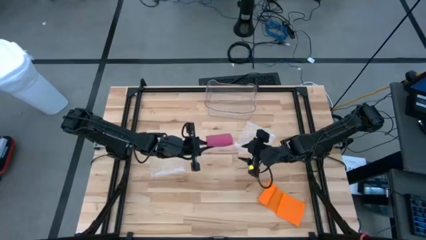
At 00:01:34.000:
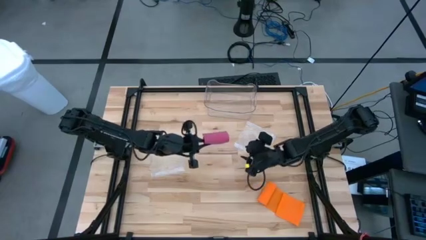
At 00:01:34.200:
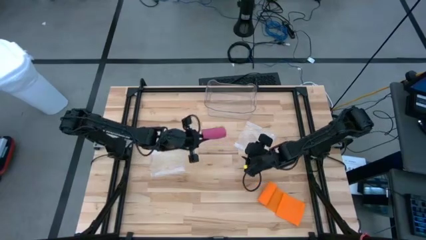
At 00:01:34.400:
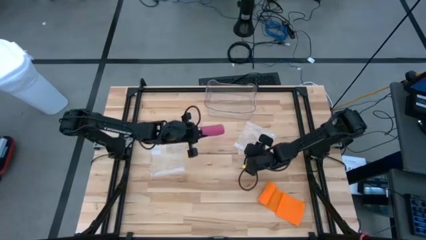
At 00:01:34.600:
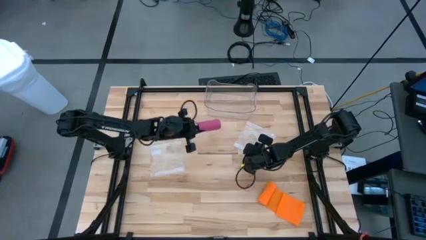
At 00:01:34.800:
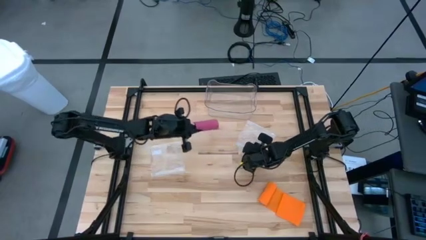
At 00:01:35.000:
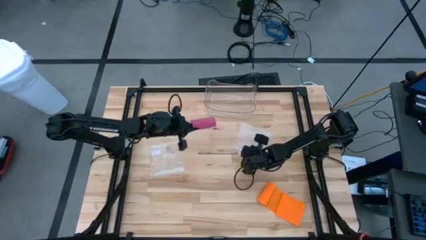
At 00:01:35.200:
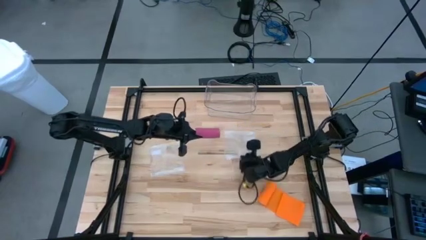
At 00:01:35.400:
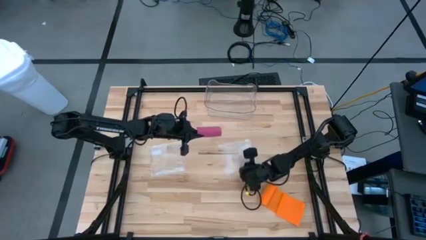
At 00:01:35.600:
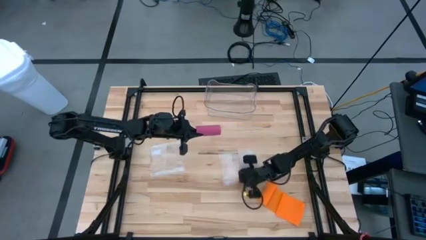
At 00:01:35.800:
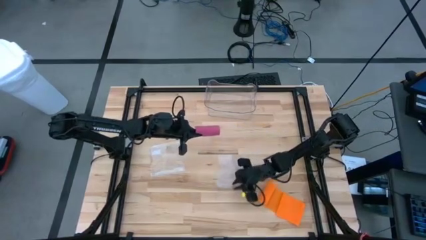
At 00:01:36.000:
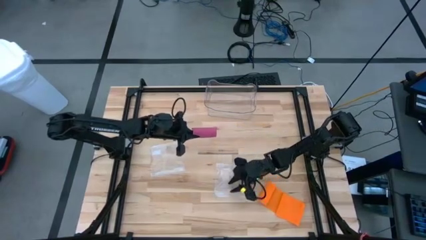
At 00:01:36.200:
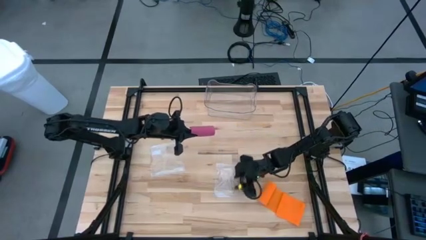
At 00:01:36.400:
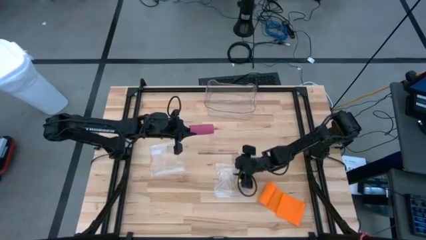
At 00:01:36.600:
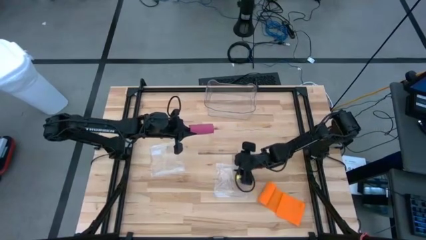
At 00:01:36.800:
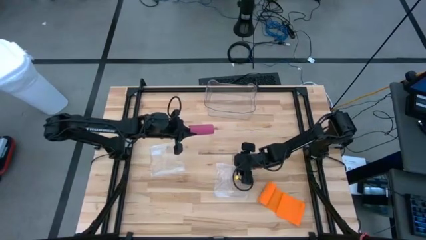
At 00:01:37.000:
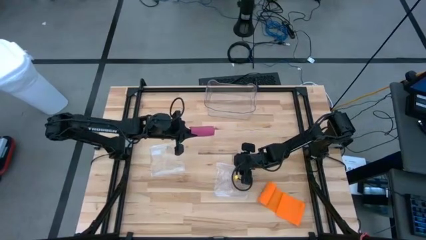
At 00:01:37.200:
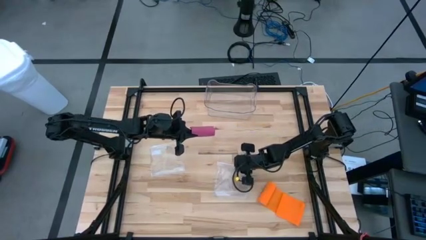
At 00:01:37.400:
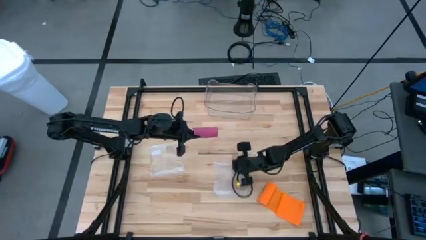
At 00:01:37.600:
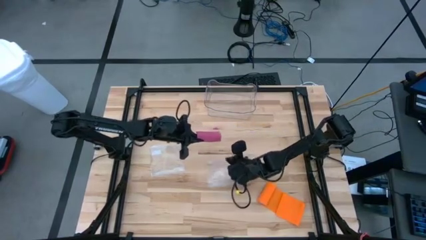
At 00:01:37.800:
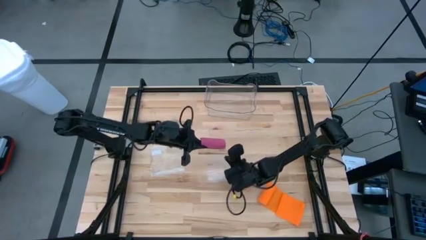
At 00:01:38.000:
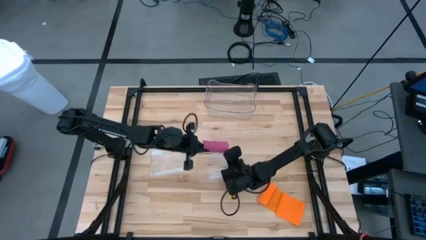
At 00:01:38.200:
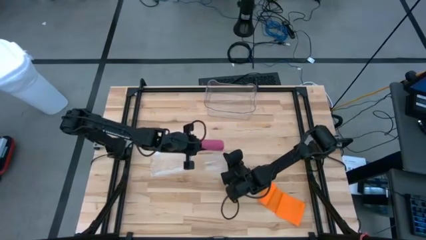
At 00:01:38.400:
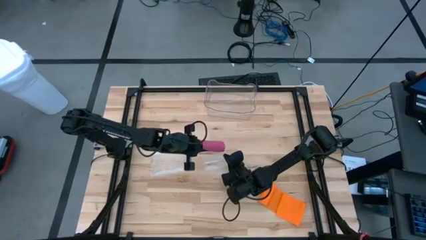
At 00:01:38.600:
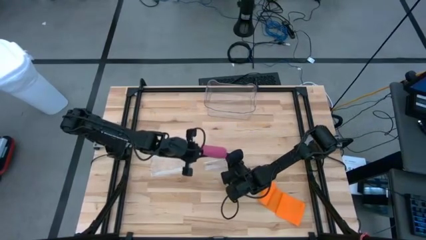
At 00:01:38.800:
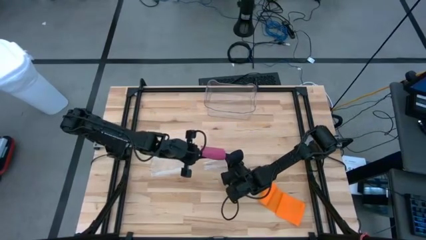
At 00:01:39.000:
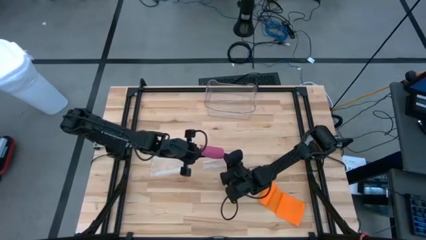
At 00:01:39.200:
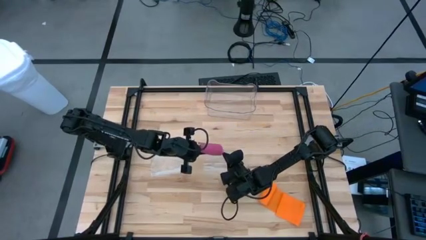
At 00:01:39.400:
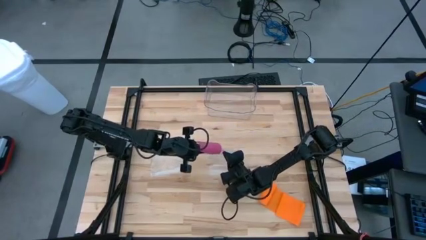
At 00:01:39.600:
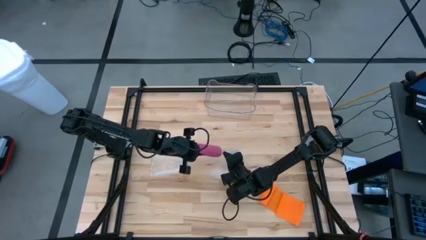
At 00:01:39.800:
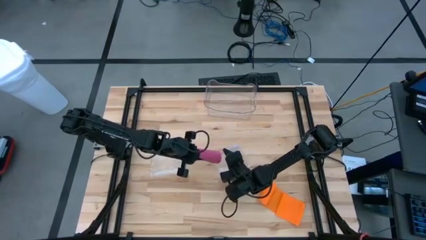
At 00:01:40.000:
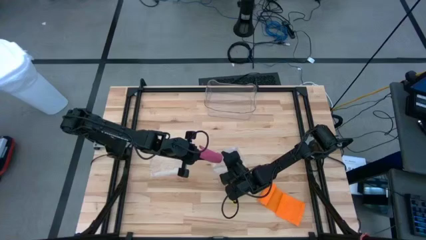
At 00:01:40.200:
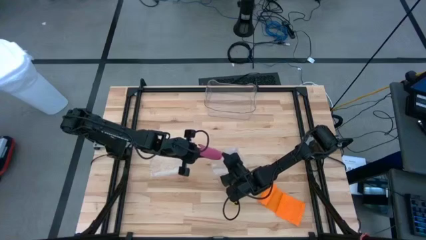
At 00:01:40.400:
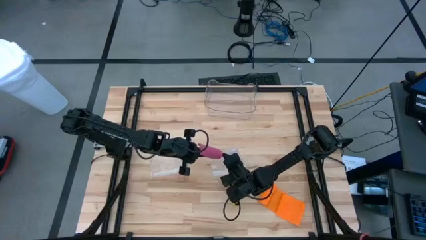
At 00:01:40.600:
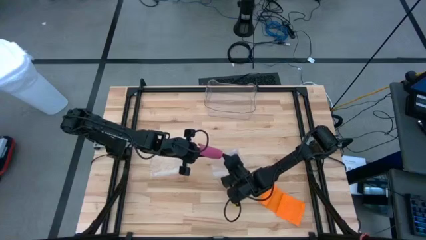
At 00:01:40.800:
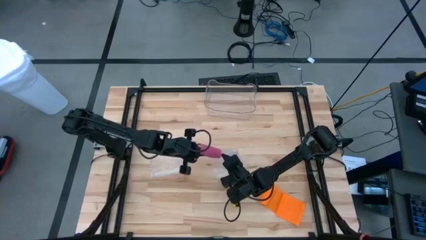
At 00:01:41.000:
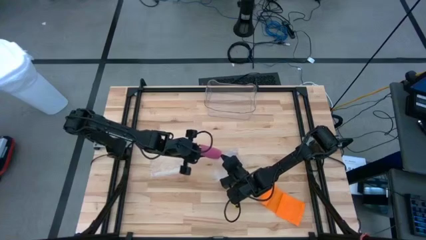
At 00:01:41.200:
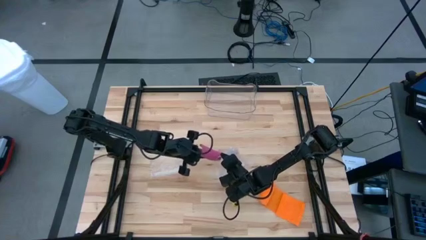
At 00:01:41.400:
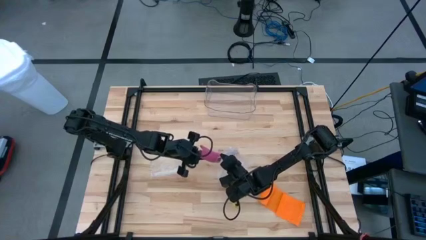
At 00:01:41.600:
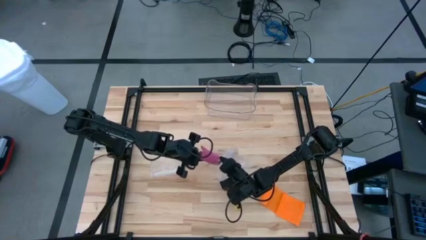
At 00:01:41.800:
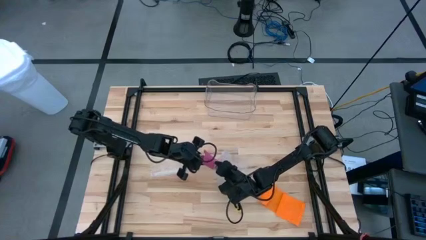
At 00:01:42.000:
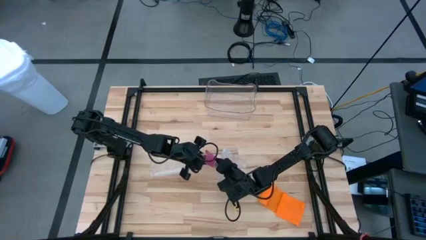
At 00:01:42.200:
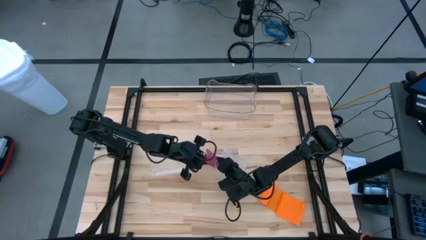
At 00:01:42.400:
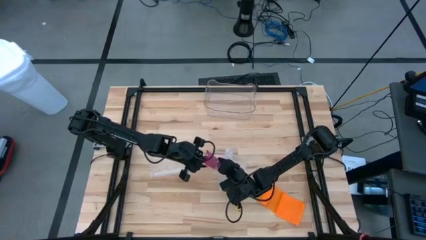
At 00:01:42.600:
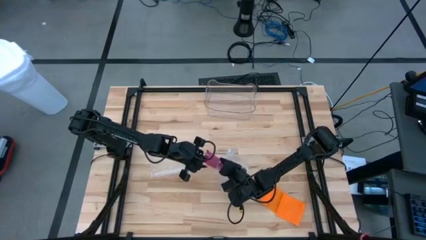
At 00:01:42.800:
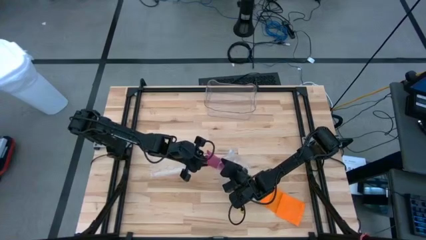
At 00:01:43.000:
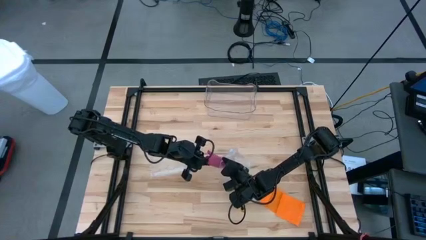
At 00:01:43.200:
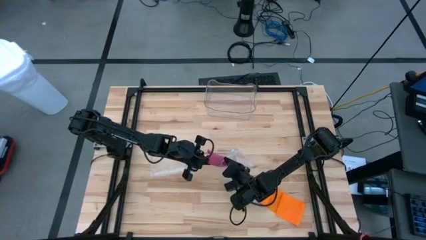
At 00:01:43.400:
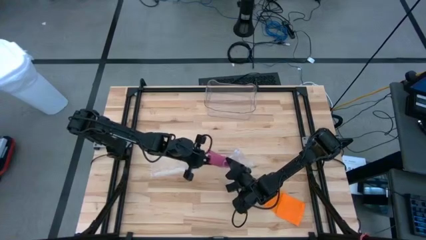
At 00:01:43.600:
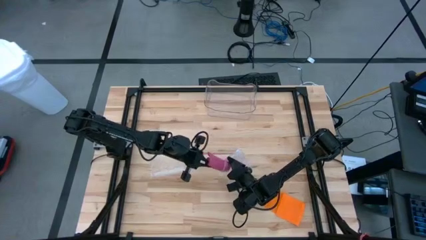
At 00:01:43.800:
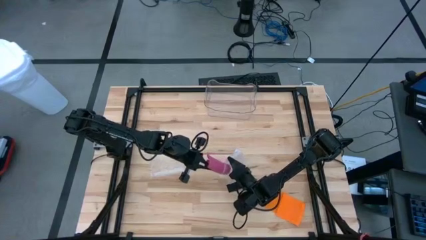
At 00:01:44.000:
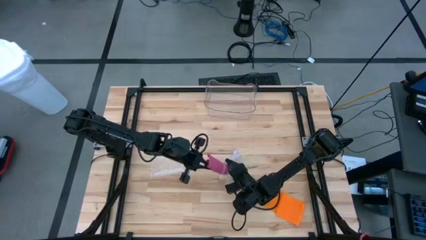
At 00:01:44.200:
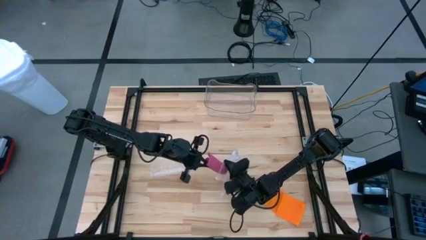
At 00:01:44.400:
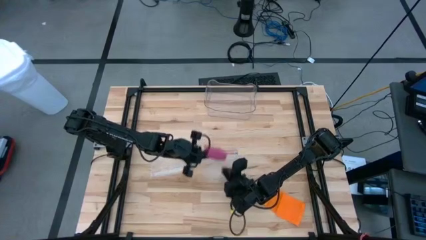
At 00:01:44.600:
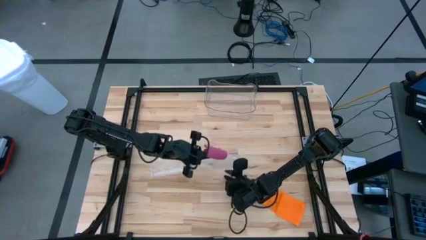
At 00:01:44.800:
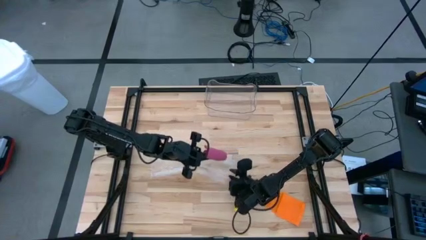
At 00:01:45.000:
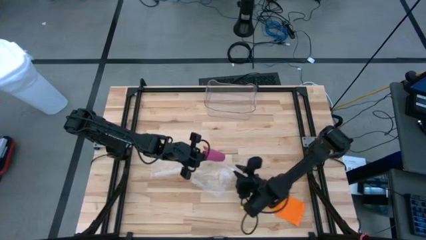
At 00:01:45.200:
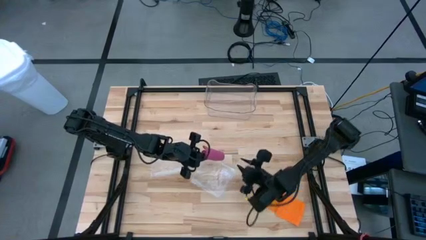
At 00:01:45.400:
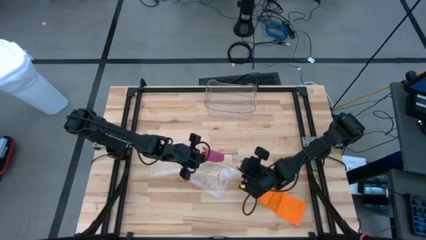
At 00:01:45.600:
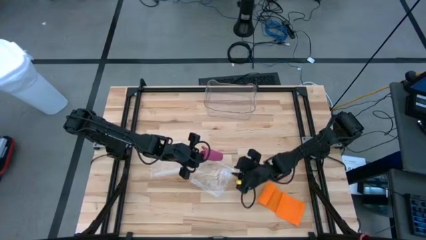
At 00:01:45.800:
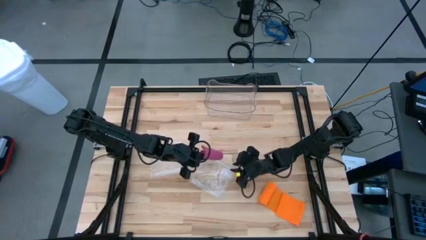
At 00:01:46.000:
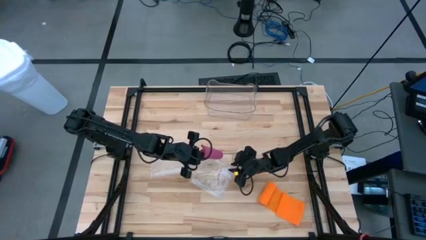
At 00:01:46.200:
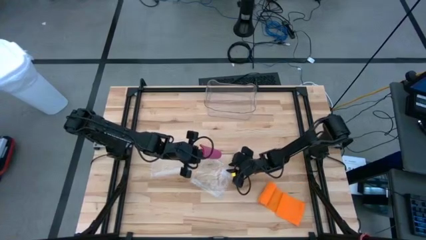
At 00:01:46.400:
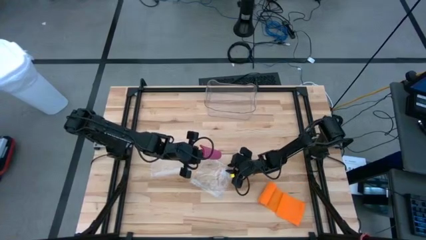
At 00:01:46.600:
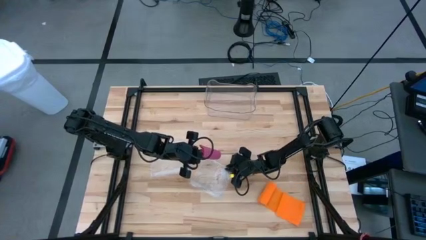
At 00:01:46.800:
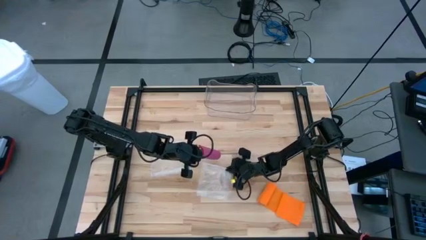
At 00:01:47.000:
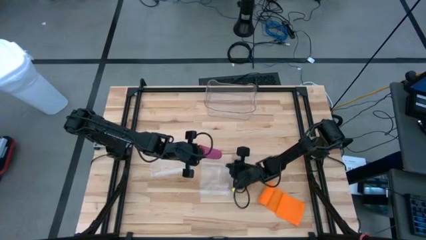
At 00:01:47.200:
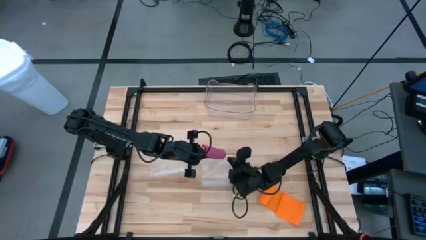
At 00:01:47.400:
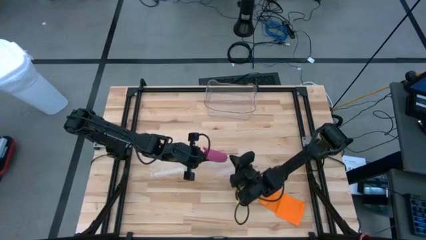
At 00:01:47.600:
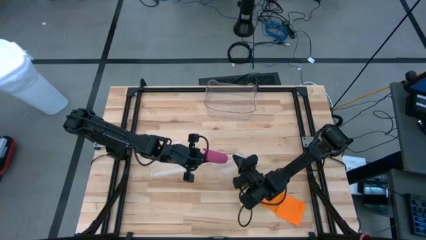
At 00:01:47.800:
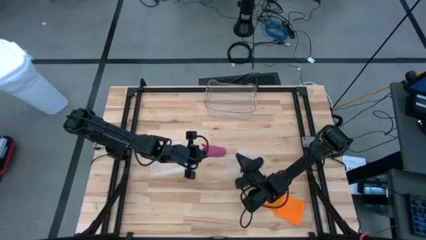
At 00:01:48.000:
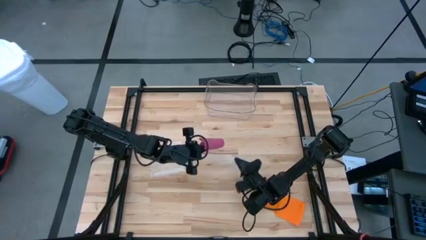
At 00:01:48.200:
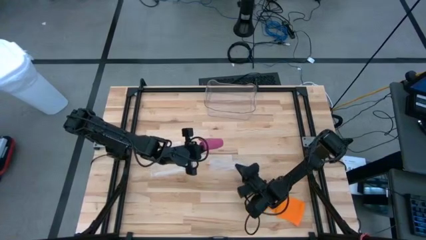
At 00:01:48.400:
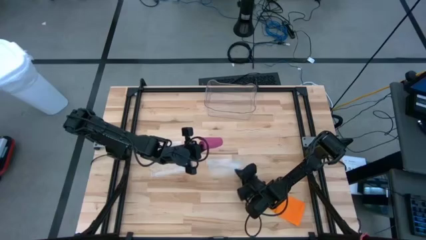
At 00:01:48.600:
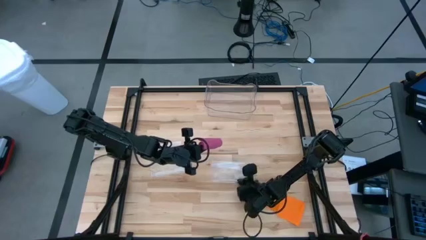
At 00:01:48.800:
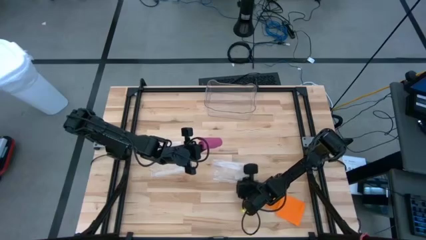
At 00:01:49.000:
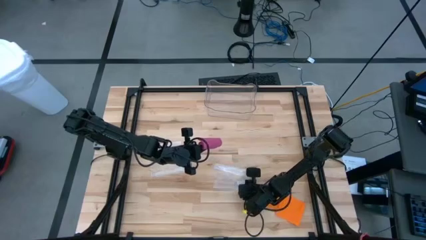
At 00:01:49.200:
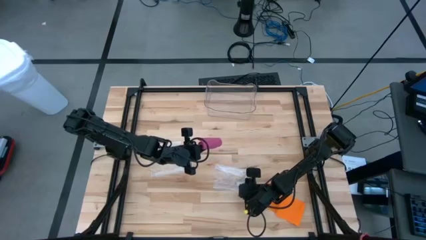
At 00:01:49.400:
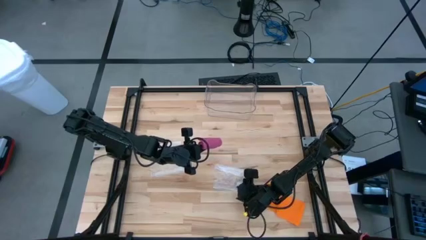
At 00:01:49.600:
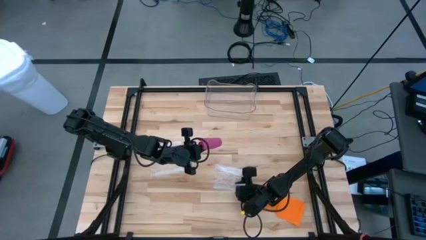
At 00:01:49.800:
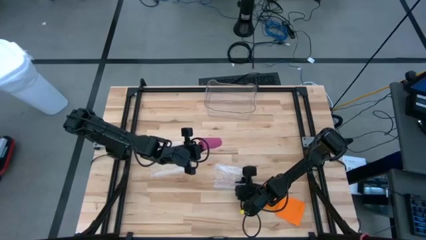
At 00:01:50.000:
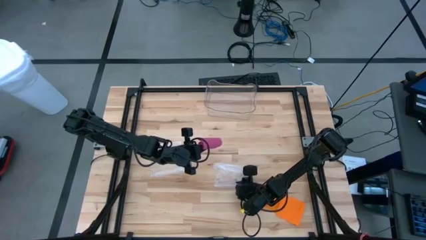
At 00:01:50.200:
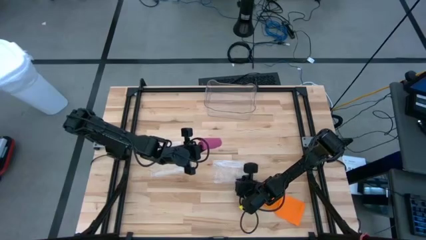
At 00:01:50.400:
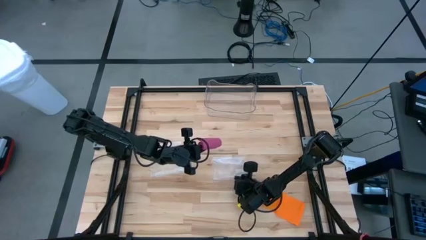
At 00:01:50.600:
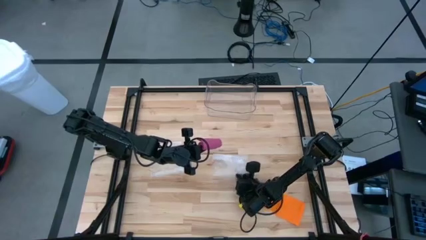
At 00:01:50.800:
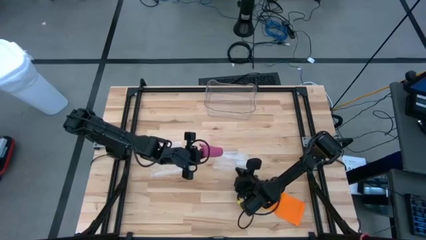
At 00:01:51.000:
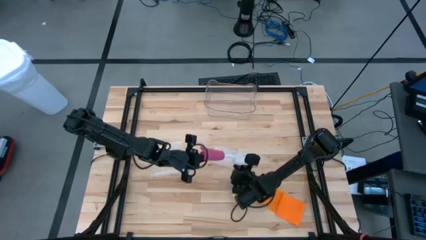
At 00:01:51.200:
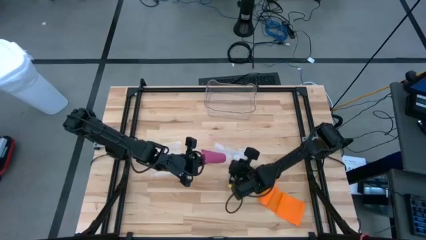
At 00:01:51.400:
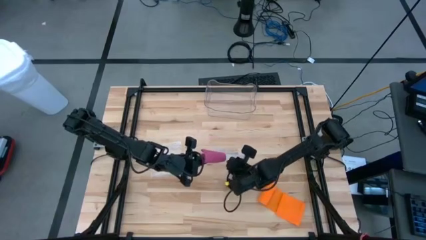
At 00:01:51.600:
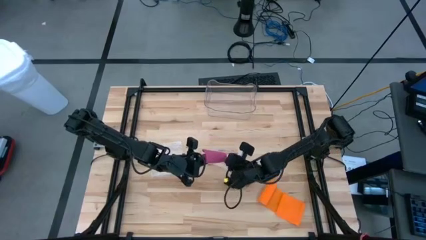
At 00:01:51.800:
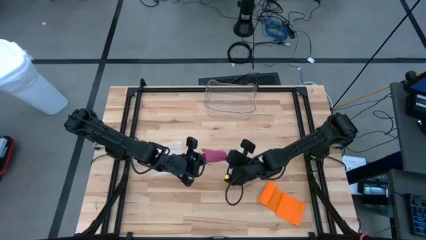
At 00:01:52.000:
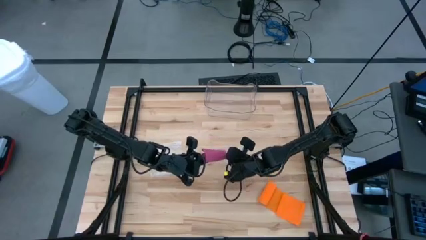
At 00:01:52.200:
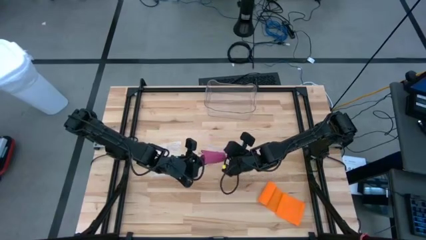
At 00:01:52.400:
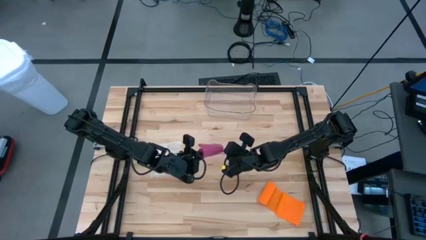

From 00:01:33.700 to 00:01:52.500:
Task: Roll bandage
Put the pink bandage into the zip bag
